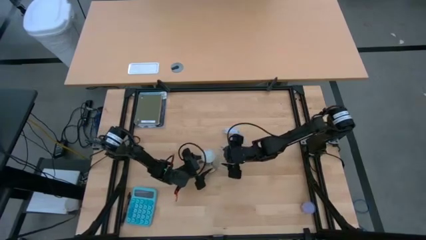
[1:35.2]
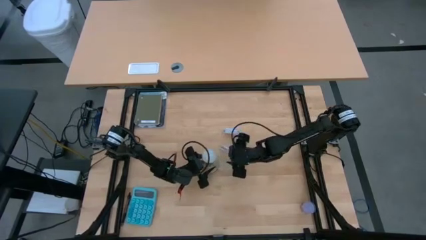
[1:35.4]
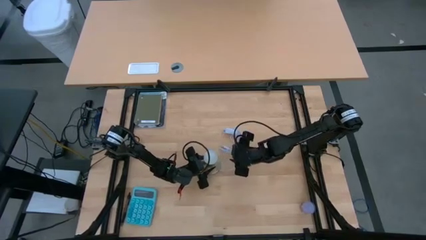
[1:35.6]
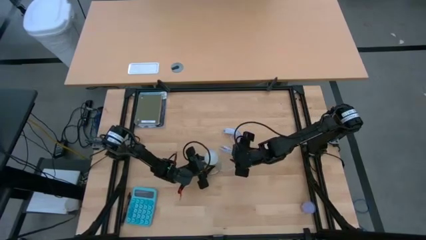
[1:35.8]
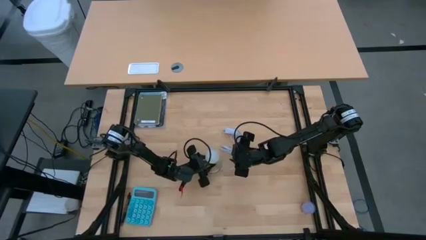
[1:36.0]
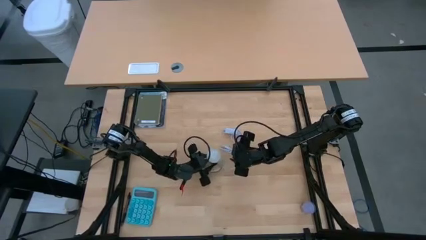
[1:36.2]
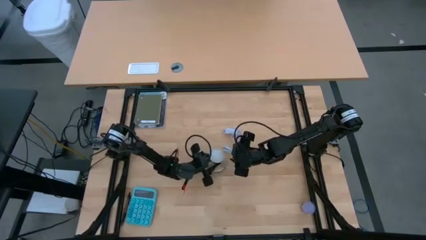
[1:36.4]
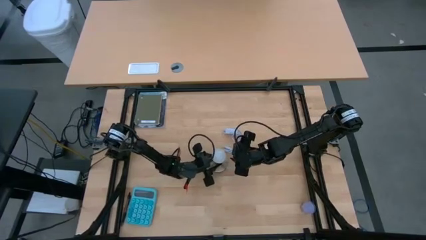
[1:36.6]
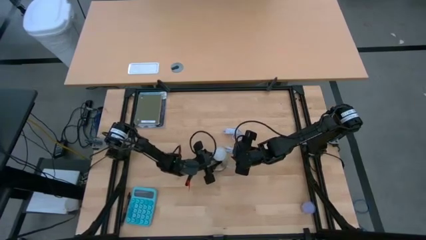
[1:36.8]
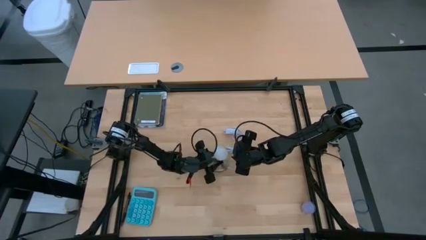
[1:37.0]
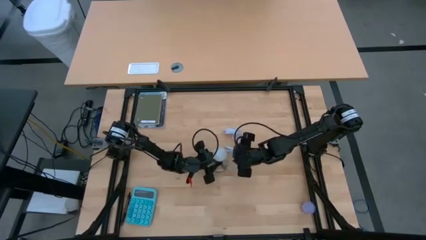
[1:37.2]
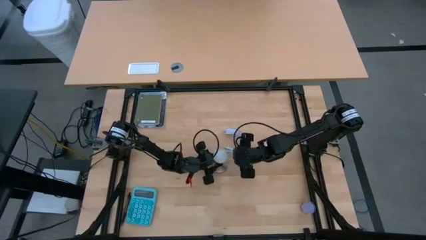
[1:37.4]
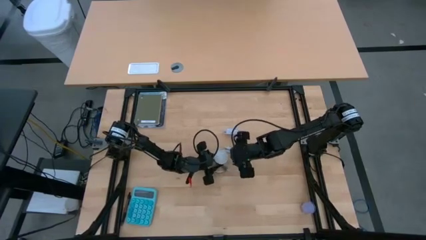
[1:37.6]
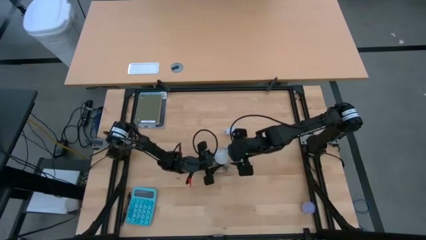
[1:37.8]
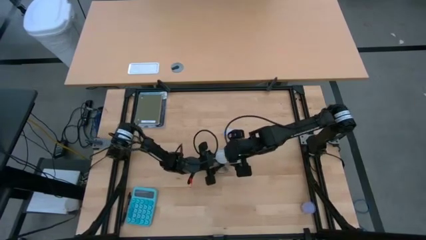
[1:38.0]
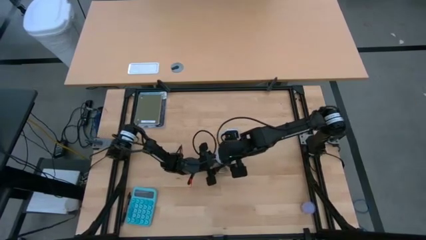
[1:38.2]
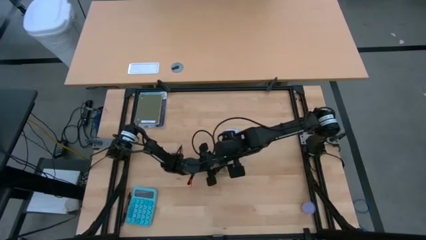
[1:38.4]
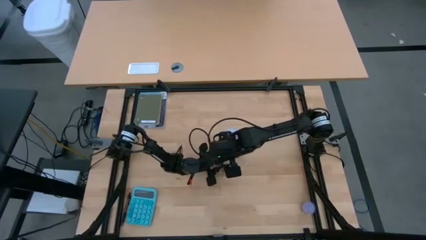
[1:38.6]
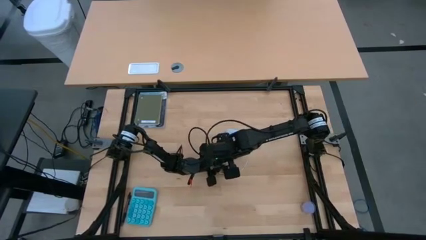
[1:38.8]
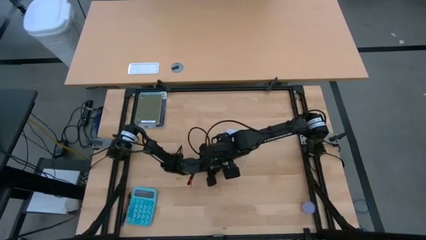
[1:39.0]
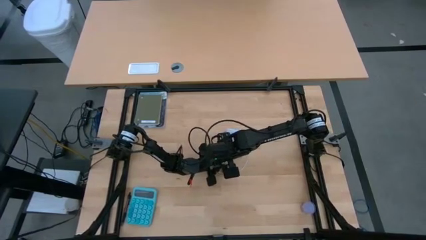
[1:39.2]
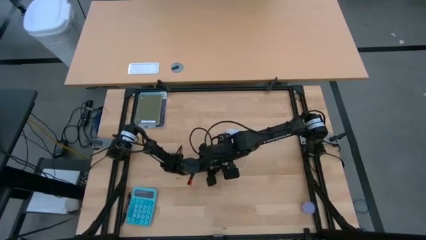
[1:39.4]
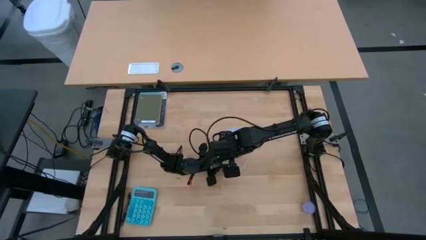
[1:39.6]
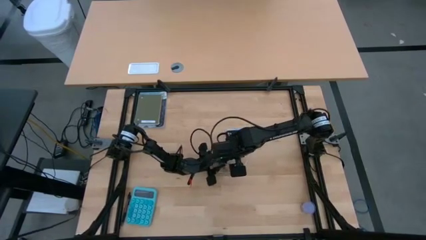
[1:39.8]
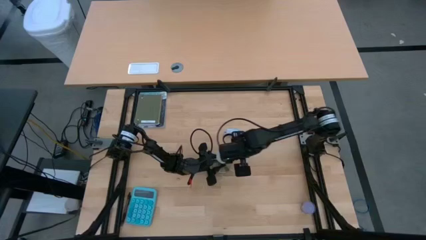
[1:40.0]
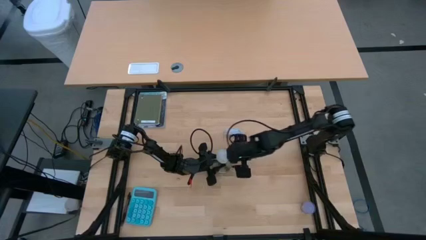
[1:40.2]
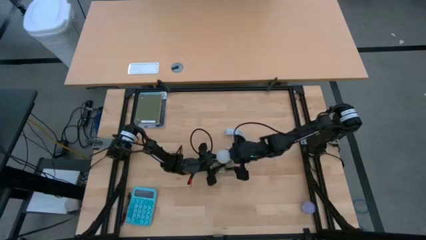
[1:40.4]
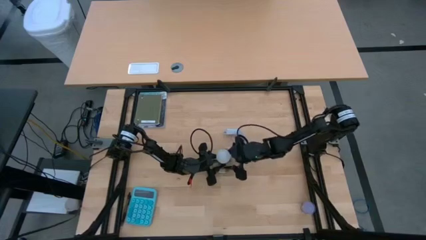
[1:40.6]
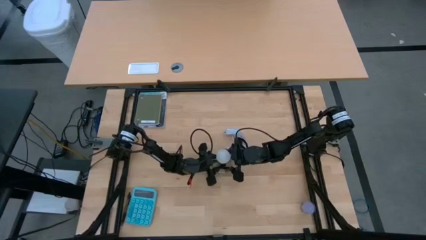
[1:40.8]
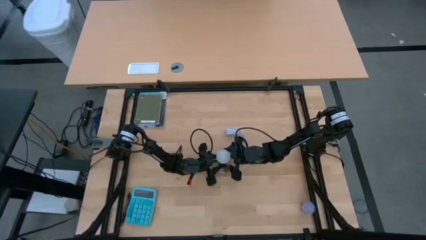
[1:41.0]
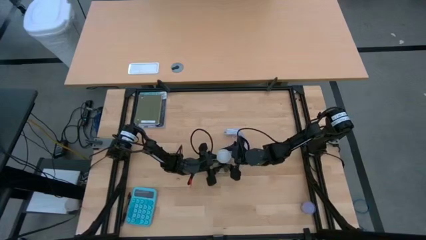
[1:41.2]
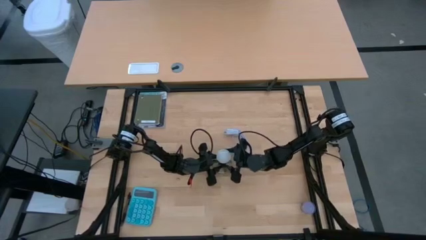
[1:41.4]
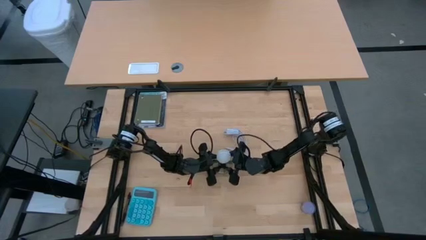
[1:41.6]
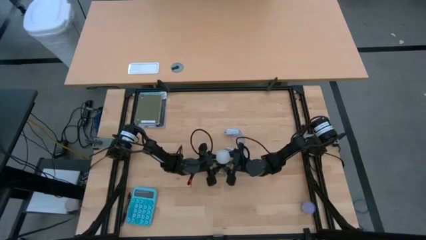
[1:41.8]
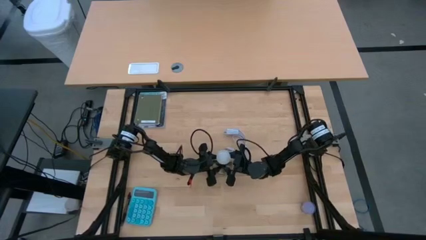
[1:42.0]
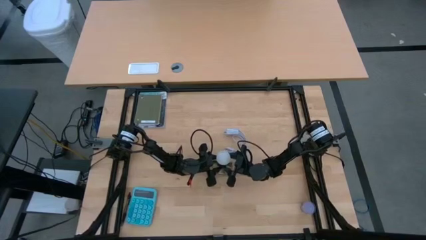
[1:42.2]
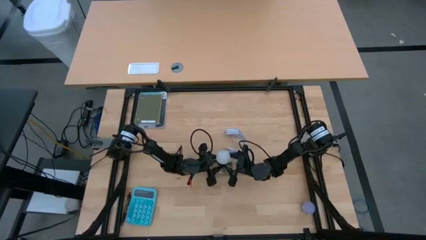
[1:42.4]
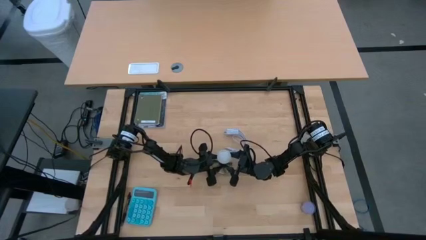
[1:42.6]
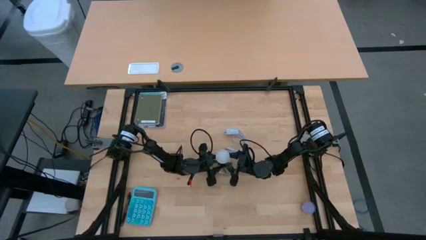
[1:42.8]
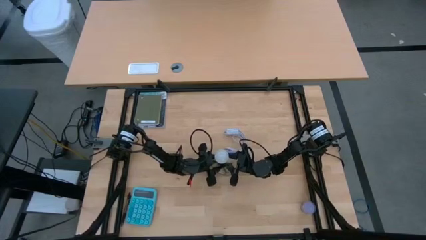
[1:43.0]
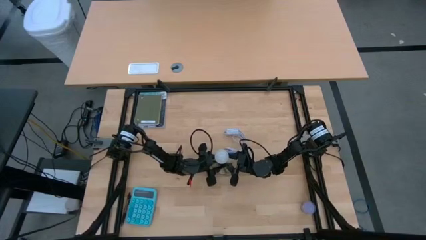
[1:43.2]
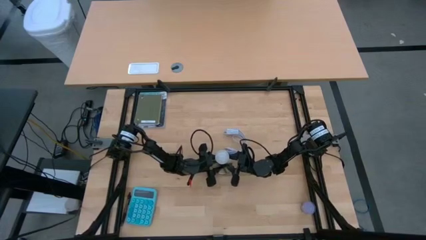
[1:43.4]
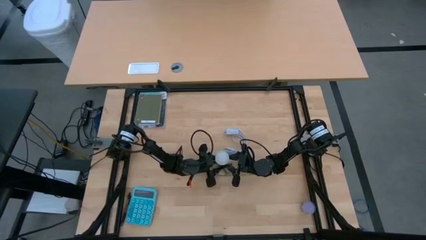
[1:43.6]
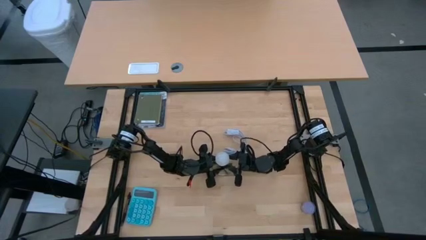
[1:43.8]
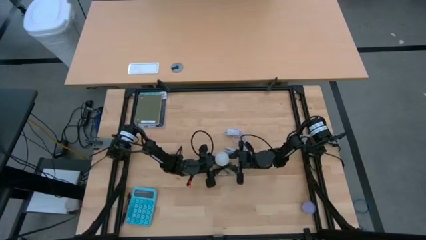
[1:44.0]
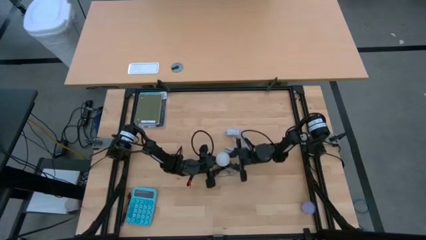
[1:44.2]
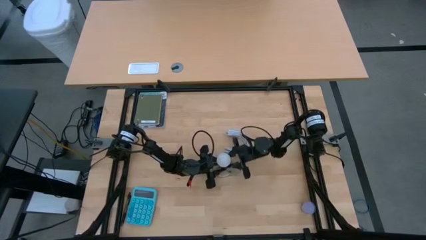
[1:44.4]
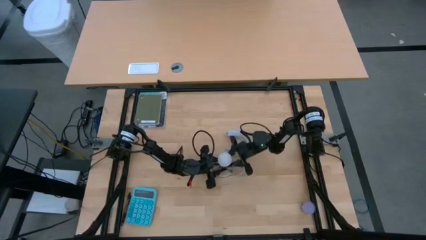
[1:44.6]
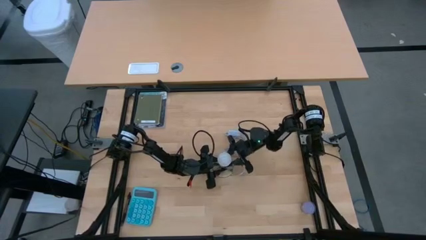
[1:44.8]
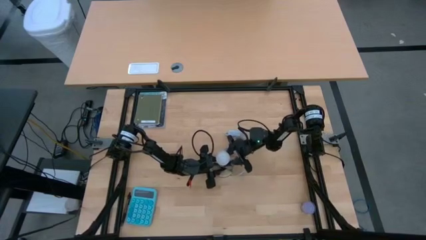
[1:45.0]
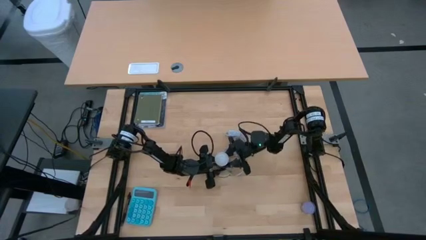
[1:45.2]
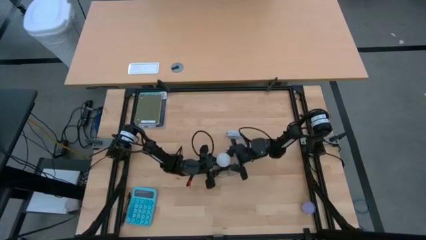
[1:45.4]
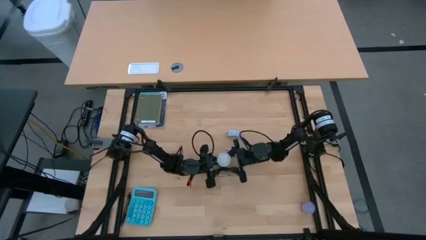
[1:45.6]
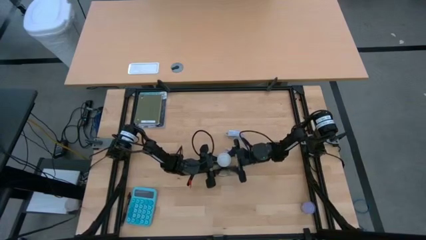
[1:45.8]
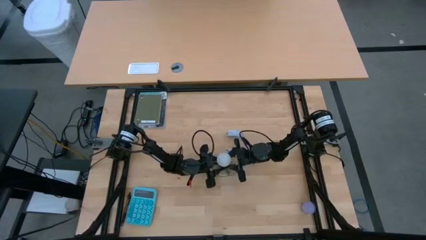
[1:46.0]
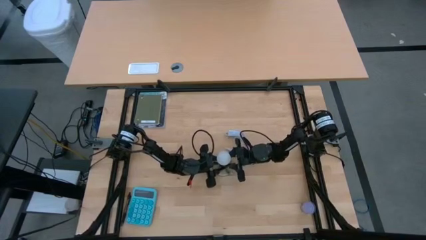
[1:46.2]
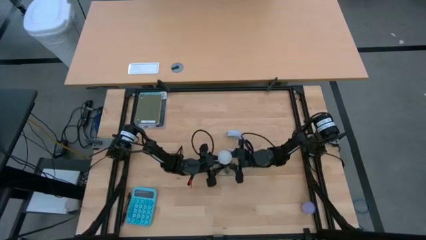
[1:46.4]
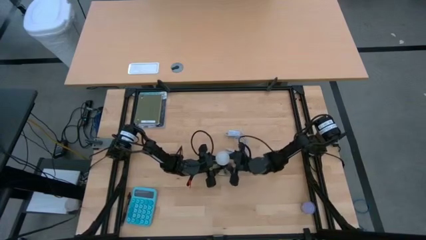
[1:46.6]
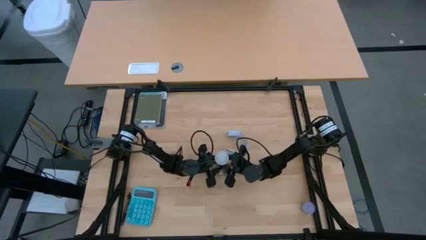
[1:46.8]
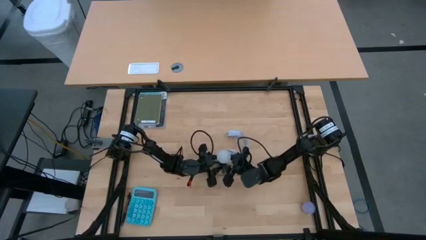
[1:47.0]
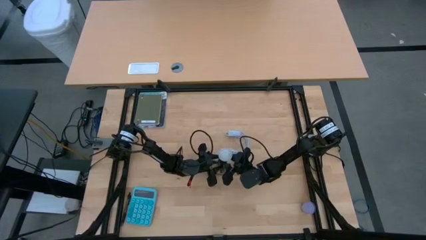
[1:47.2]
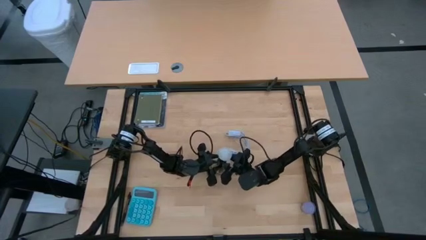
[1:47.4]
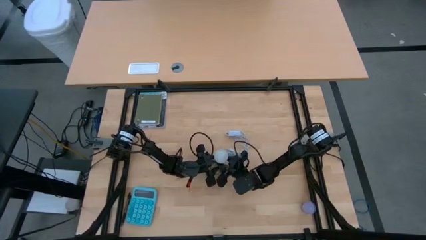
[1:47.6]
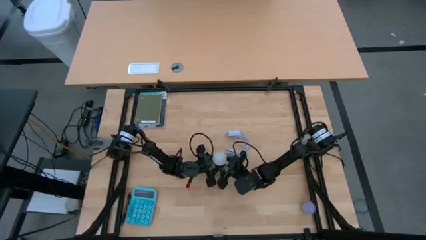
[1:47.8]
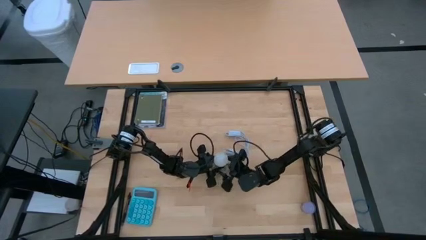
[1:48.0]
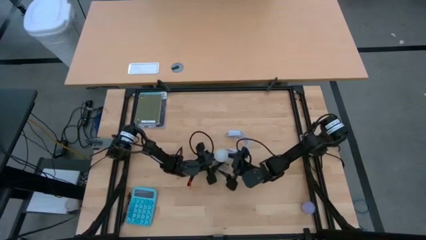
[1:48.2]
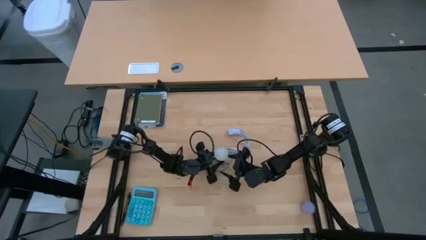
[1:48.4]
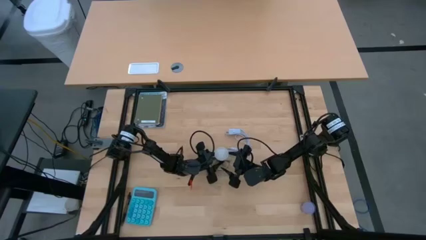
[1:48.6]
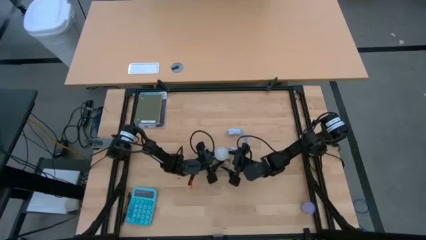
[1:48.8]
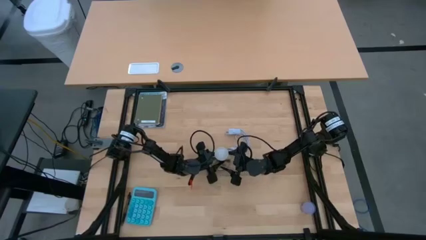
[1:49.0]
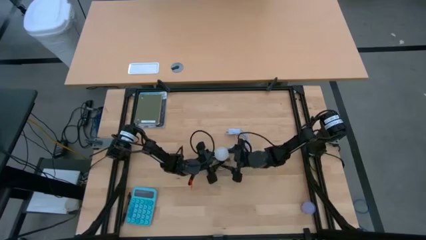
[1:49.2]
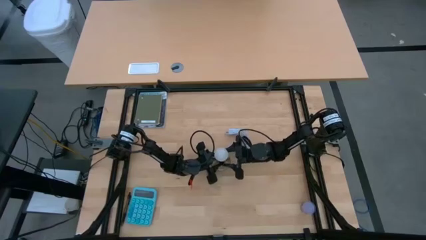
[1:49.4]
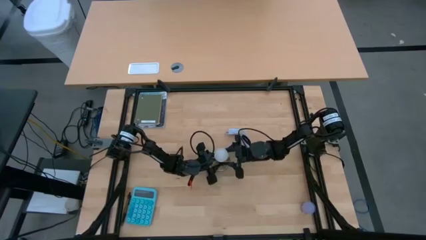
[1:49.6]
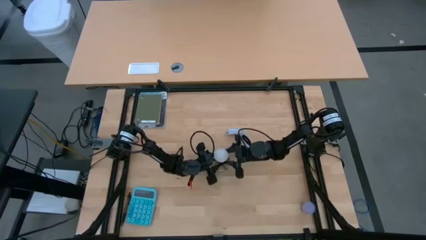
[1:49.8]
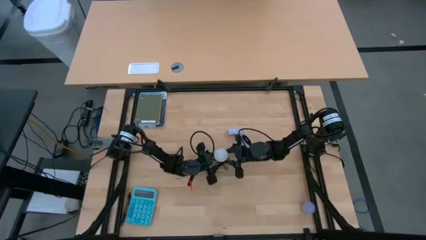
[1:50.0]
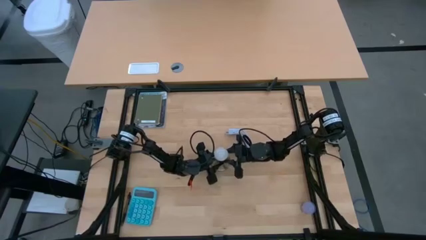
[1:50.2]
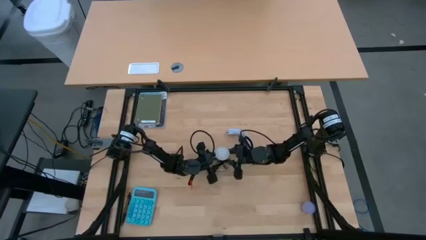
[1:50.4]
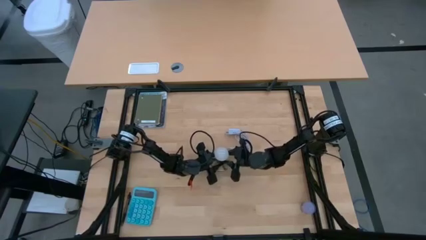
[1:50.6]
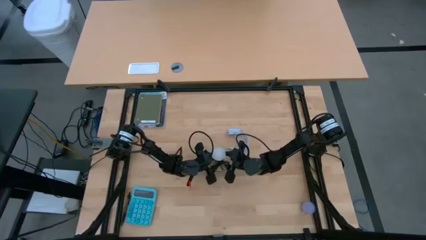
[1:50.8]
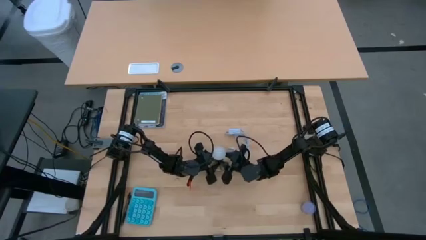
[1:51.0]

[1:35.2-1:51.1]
Task: Screw lightbulb
Remove the lightbulb from the lamp
